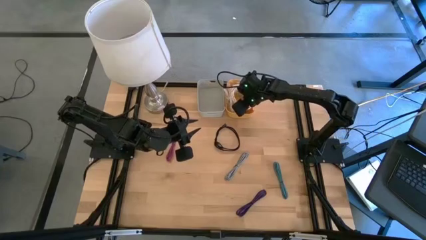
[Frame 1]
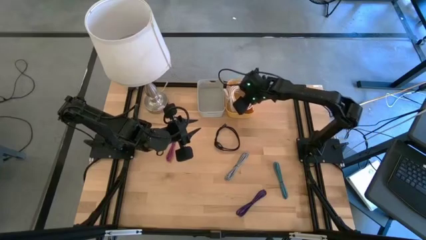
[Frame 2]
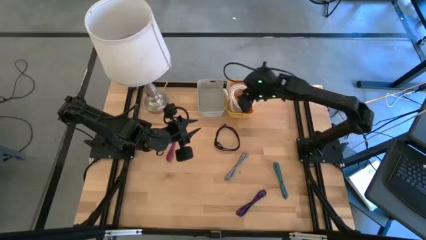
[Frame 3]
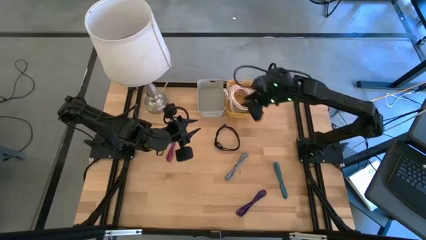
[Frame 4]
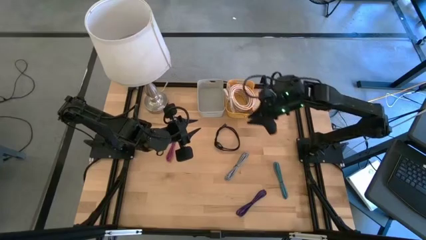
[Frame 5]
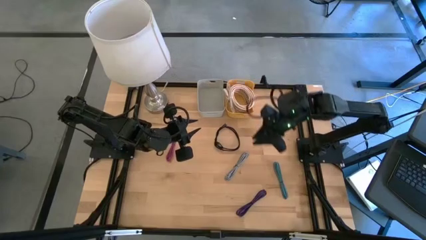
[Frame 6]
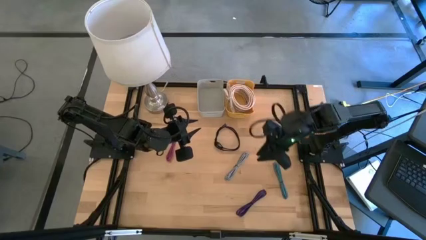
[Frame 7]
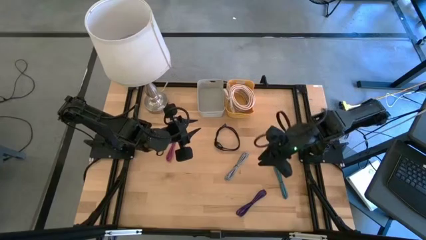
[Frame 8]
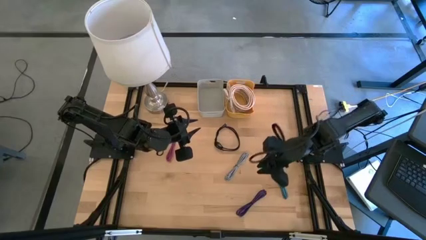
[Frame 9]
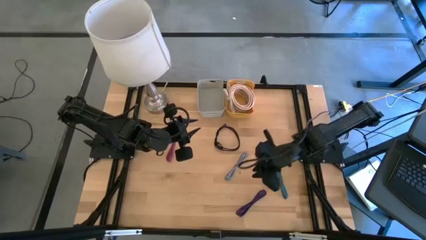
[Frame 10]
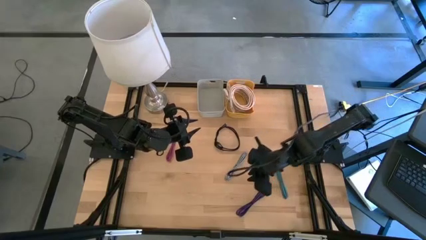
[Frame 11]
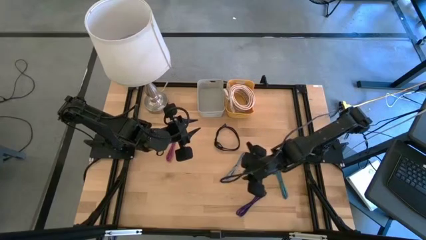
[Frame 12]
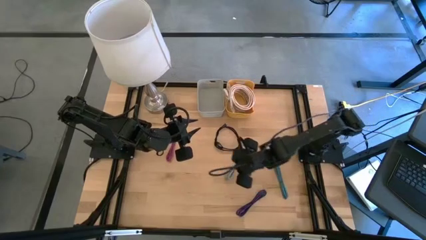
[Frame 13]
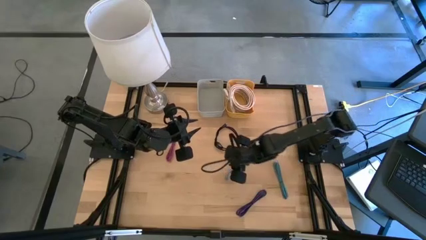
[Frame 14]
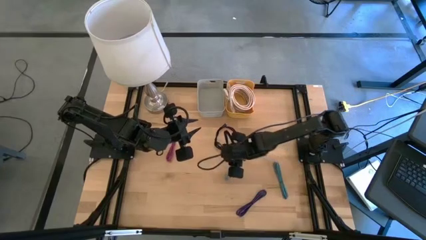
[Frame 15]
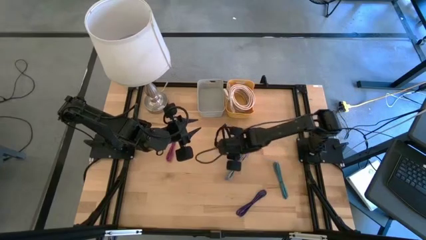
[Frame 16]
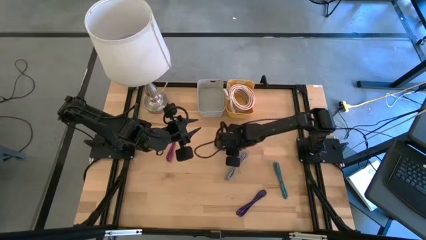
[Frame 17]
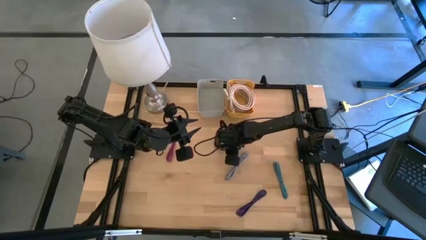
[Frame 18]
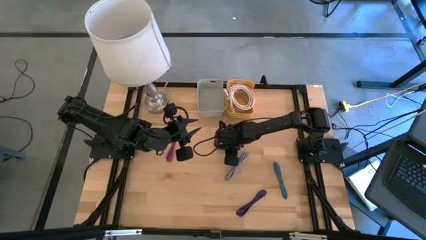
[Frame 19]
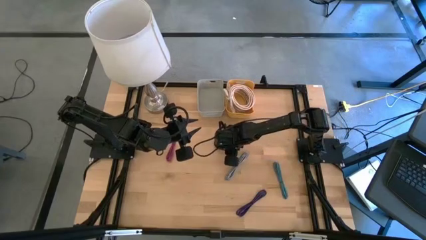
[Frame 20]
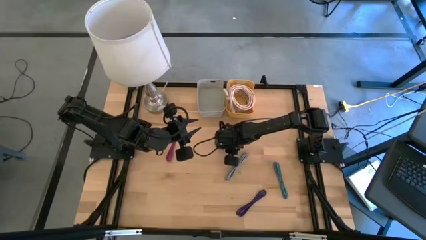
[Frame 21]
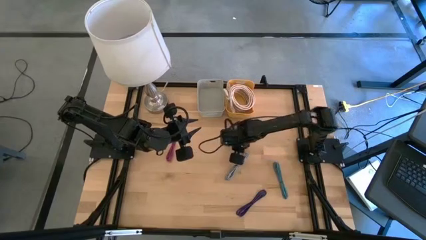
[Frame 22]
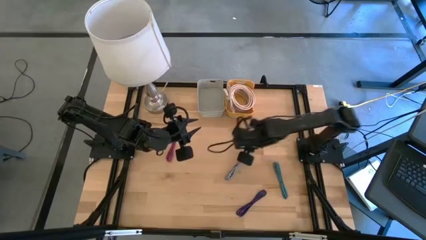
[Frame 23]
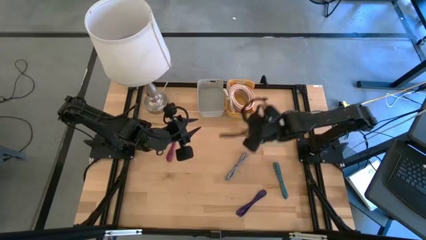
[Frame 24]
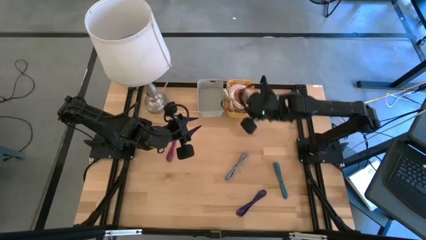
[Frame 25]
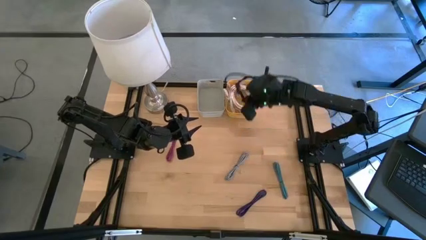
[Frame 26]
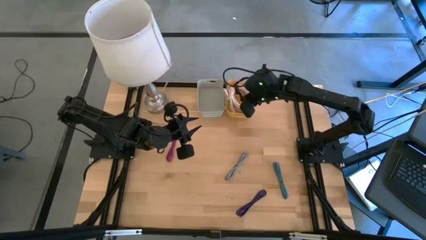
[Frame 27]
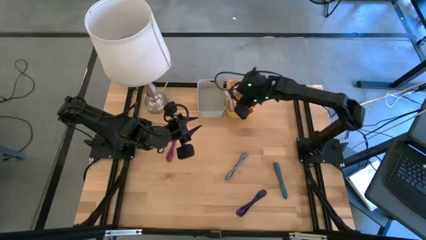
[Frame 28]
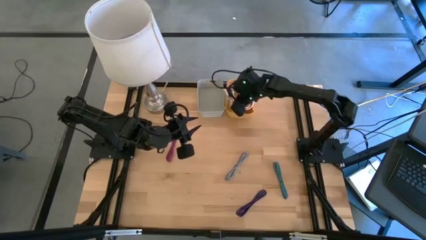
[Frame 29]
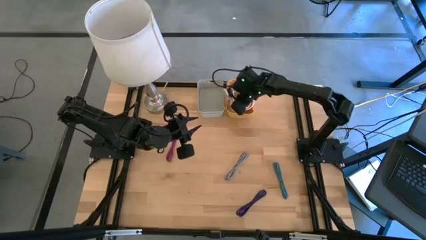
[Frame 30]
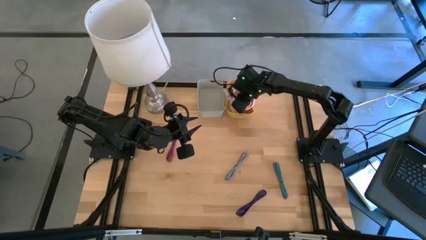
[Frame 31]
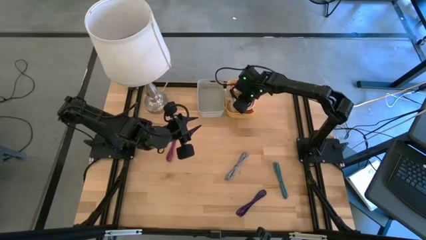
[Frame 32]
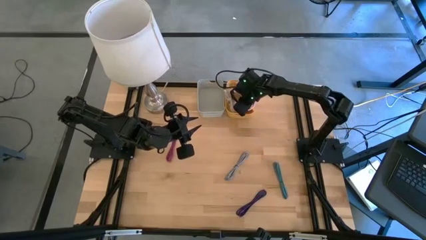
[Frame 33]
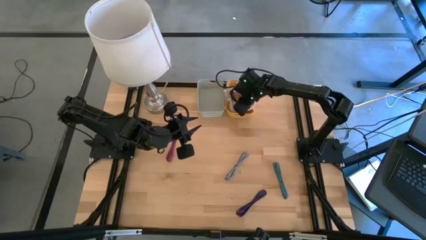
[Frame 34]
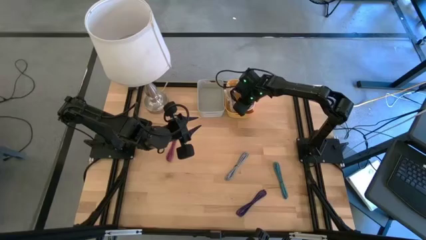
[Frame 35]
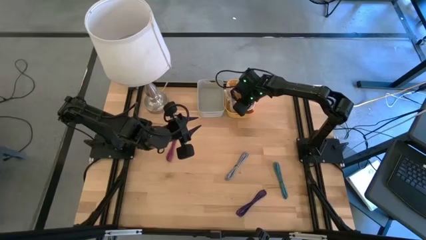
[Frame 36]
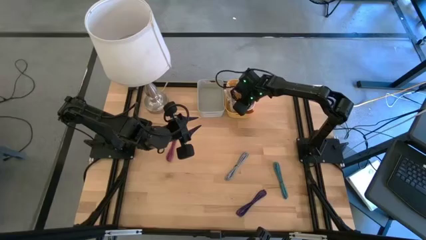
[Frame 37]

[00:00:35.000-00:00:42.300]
Put the black HDMI cable into the yellow bin

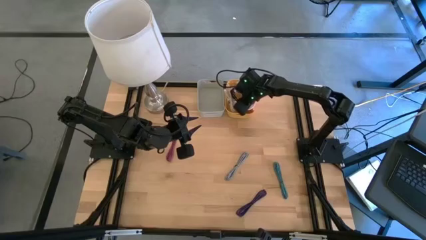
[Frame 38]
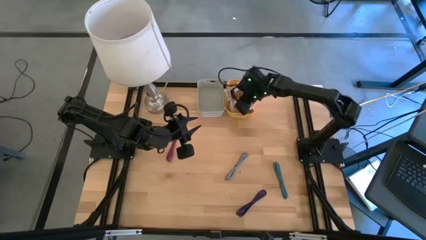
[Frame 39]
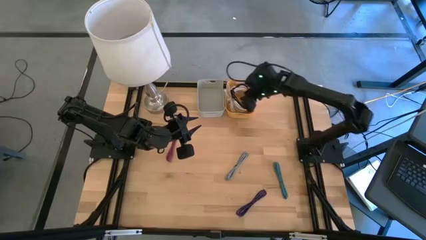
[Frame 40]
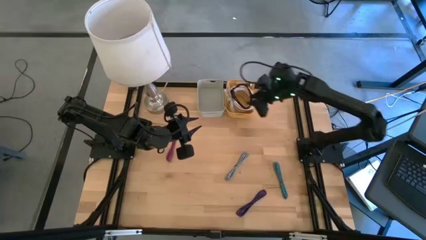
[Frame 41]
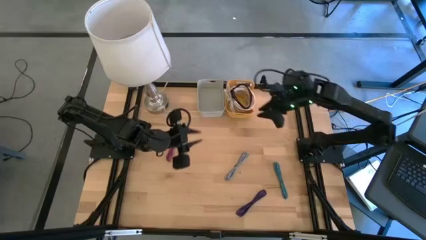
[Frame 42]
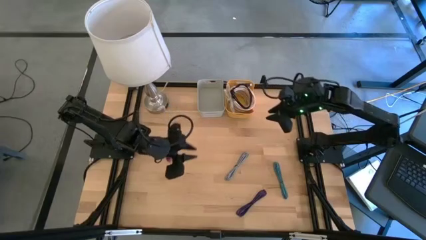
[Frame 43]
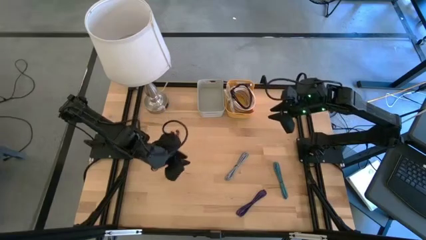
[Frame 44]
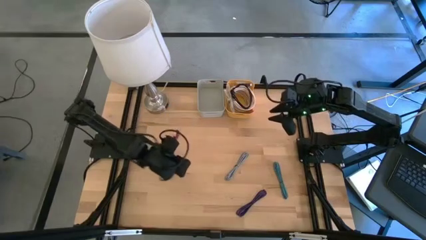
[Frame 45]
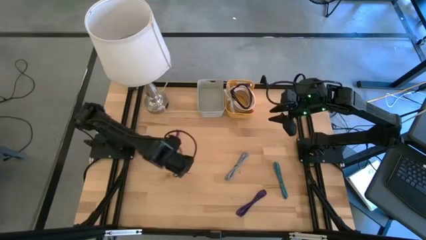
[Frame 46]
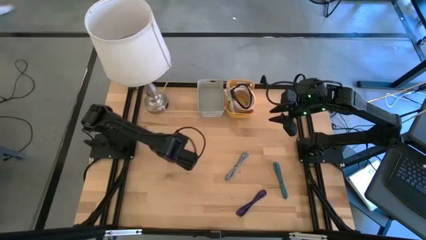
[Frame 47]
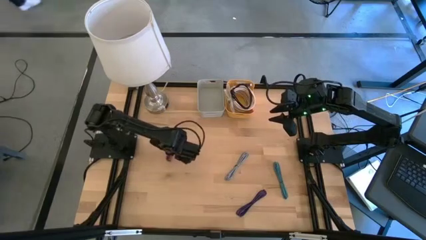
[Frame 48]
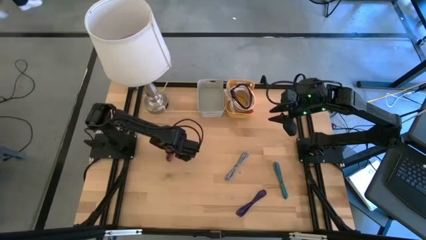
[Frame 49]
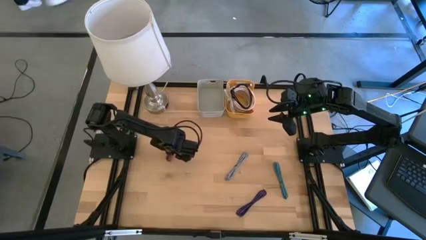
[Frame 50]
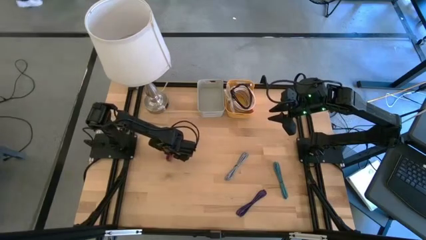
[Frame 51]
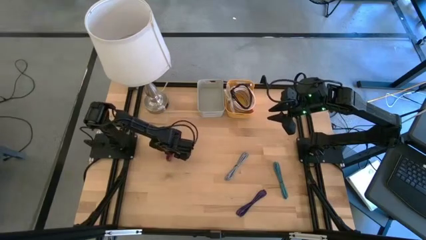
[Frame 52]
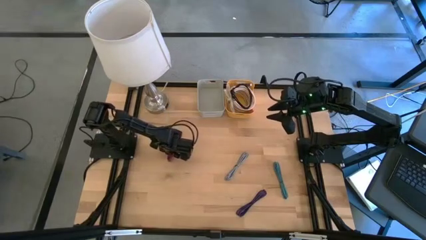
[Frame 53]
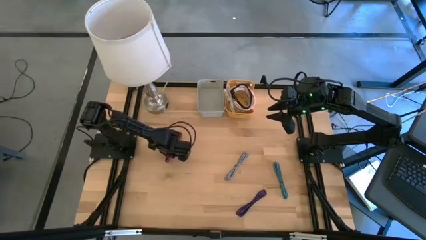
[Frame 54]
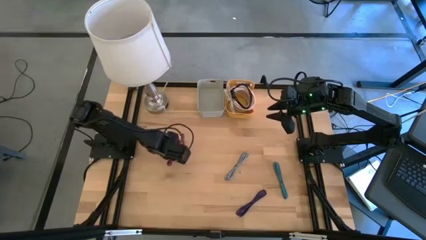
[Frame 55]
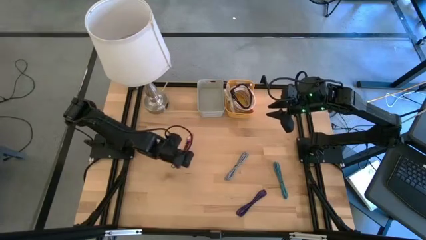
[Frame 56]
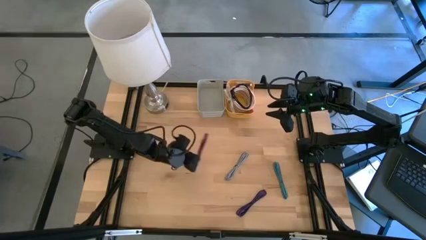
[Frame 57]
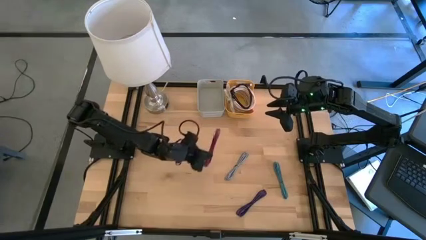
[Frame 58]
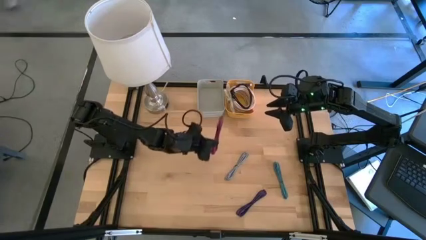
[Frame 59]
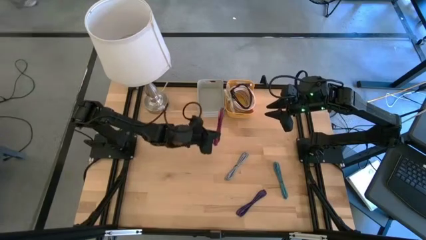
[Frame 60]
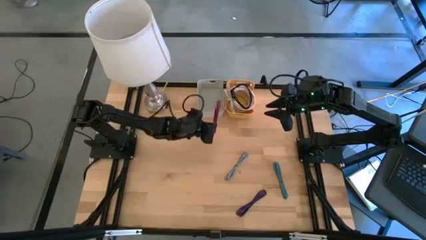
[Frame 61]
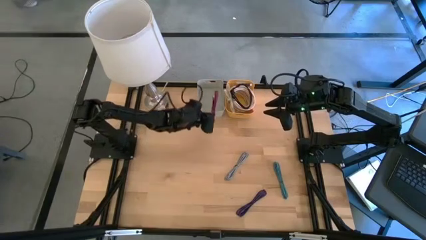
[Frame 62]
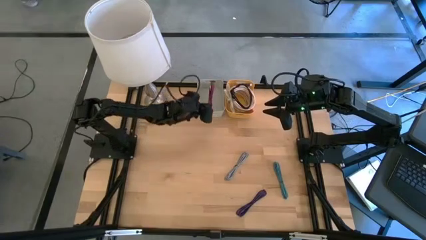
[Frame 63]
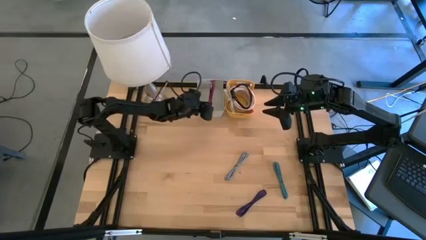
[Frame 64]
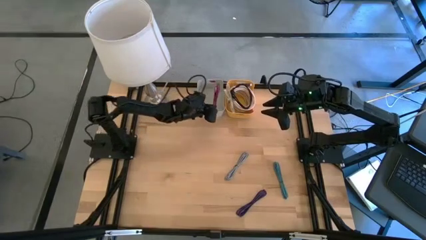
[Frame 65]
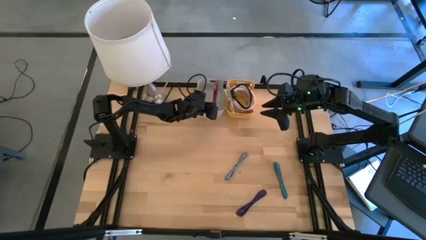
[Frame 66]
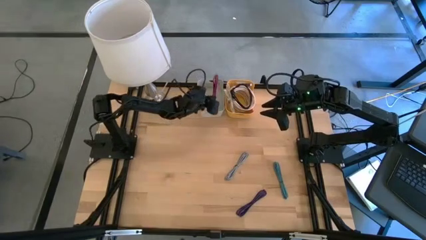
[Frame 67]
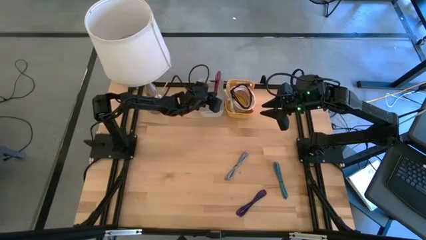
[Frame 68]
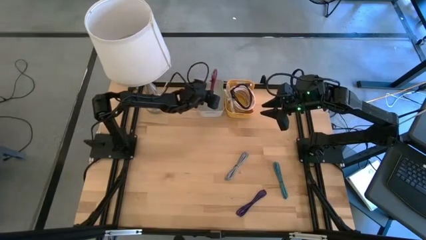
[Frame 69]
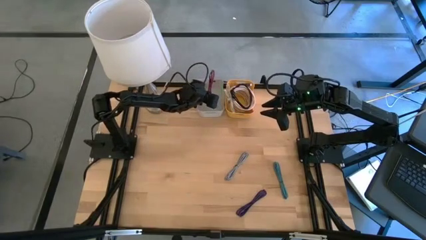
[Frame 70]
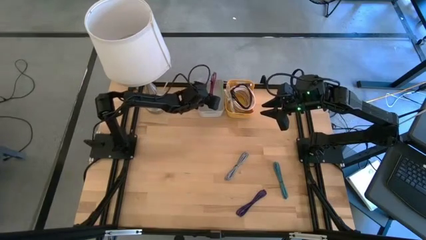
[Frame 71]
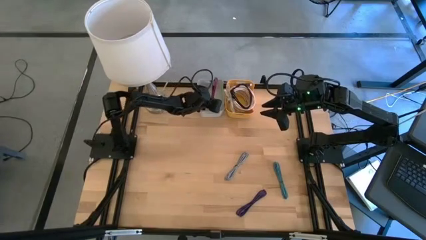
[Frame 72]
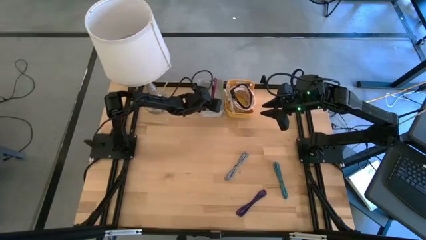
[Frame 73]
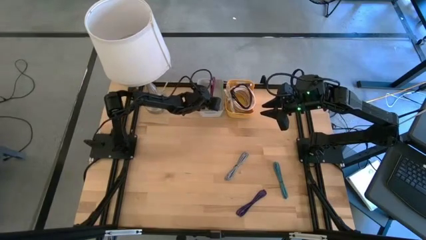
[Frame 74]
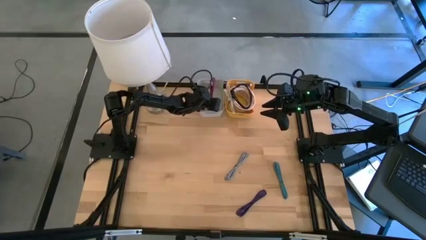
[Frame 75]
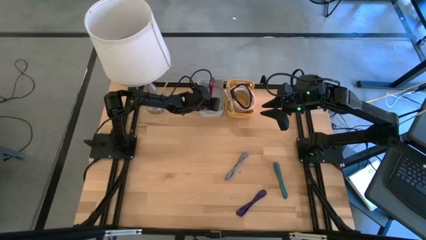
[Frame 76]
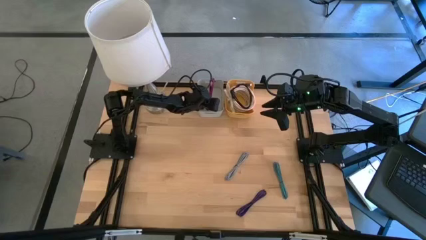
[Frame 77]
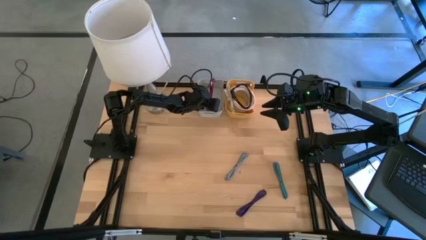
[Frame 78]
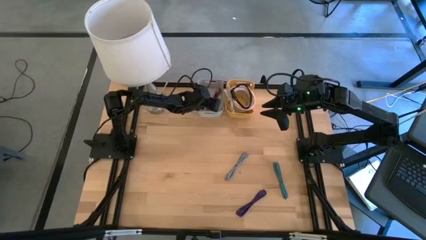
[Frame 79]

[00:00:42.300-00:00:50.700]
Put the pink USB cable into the gray bin
